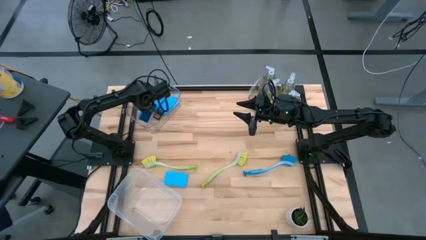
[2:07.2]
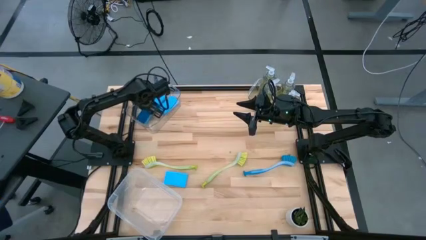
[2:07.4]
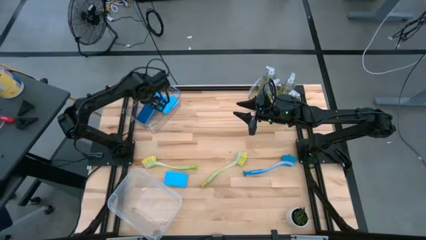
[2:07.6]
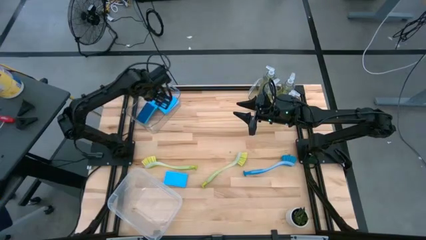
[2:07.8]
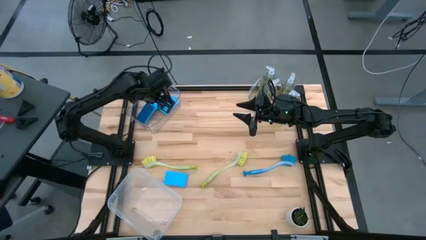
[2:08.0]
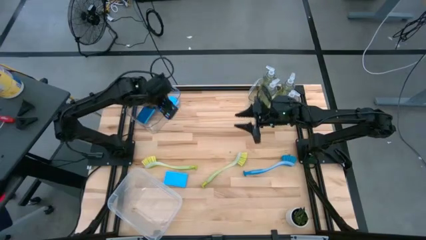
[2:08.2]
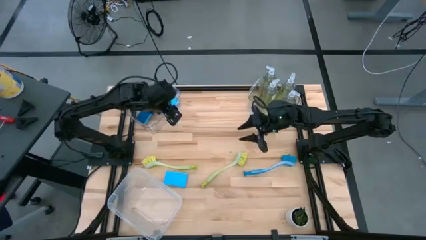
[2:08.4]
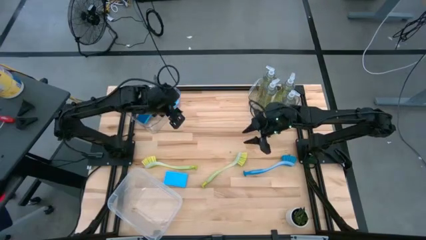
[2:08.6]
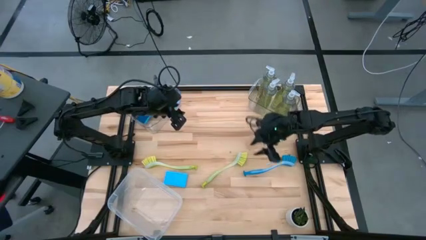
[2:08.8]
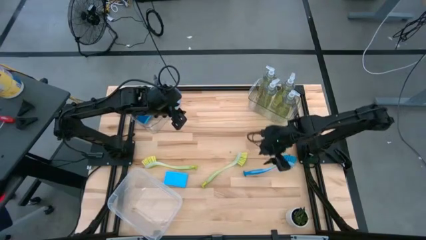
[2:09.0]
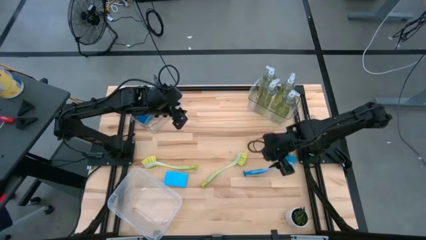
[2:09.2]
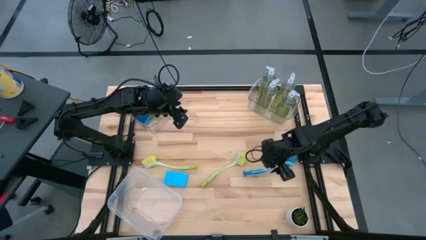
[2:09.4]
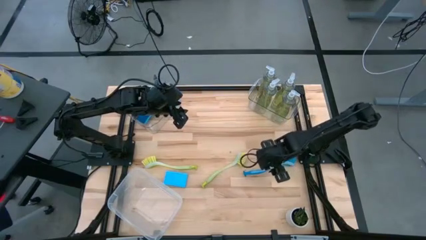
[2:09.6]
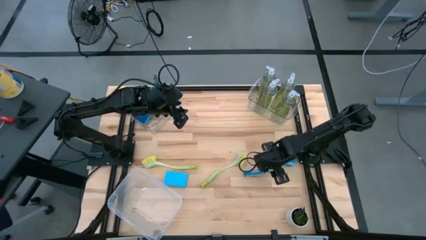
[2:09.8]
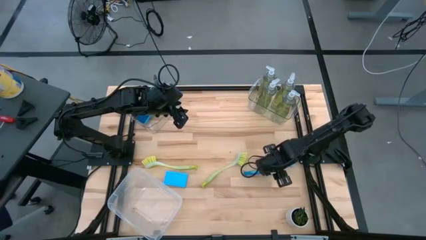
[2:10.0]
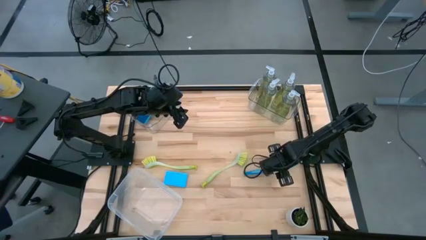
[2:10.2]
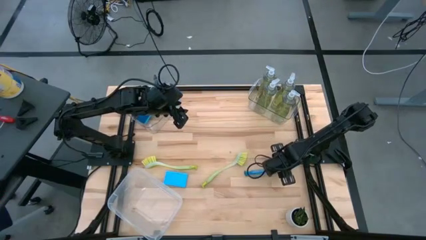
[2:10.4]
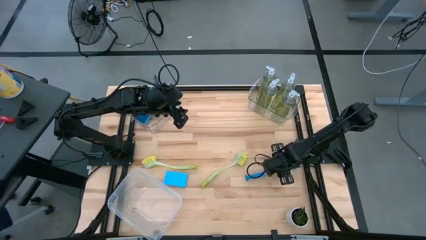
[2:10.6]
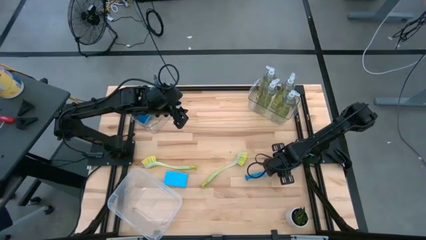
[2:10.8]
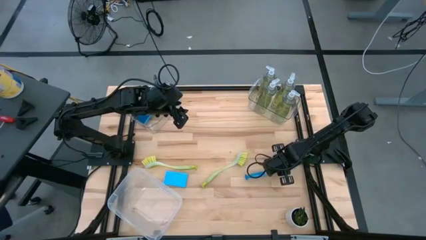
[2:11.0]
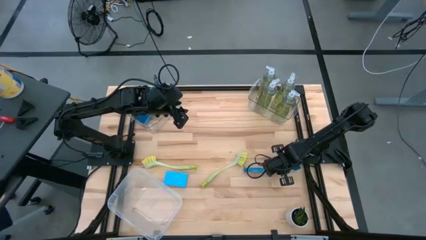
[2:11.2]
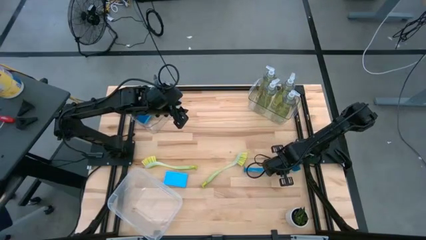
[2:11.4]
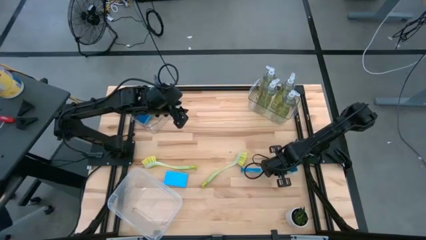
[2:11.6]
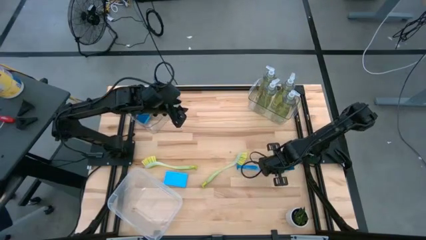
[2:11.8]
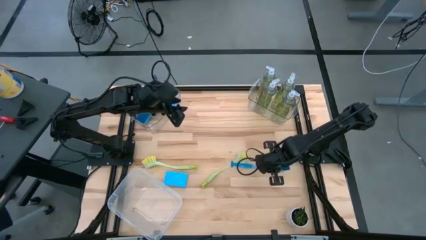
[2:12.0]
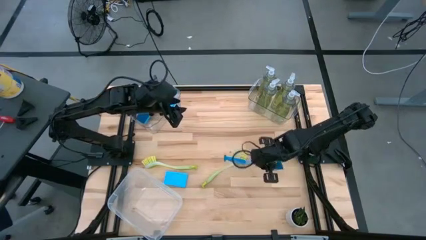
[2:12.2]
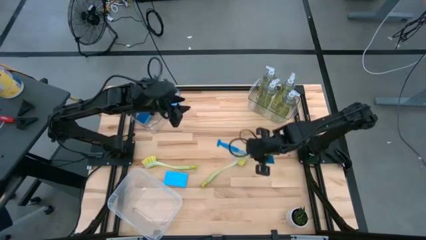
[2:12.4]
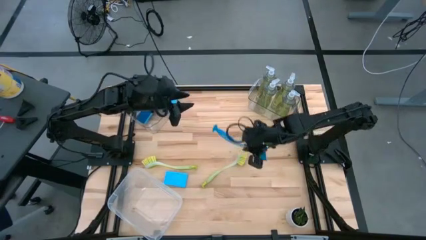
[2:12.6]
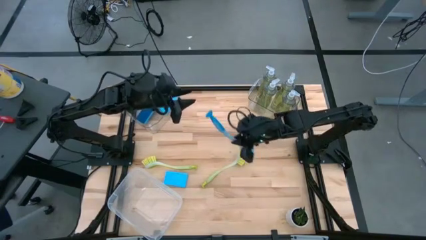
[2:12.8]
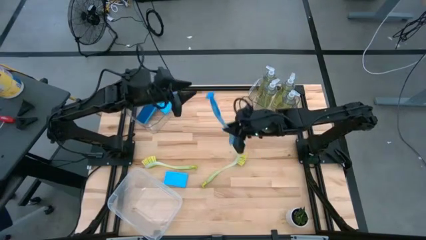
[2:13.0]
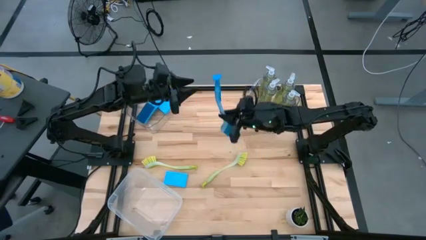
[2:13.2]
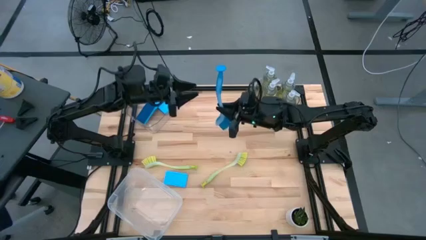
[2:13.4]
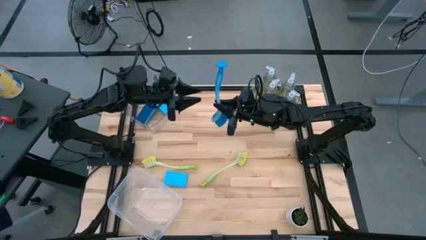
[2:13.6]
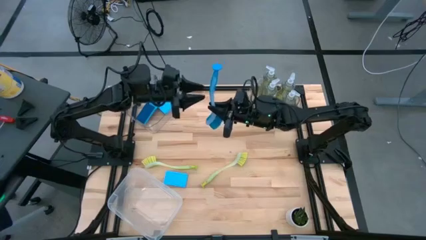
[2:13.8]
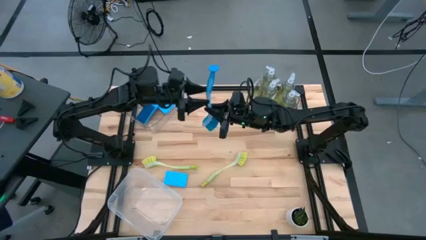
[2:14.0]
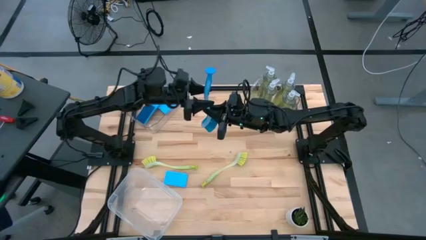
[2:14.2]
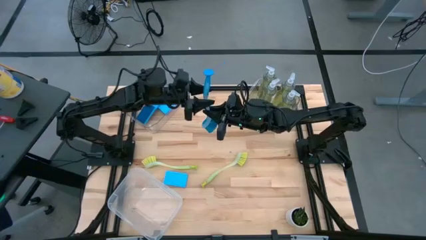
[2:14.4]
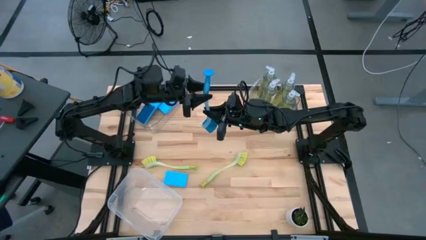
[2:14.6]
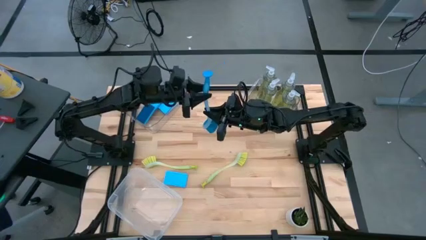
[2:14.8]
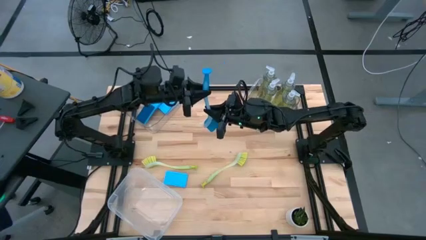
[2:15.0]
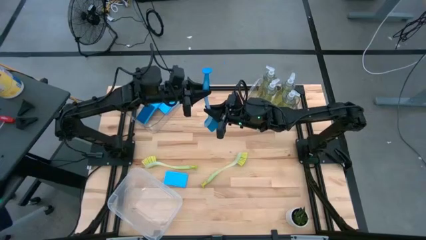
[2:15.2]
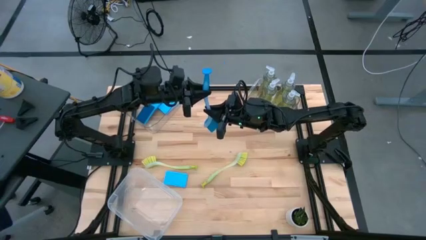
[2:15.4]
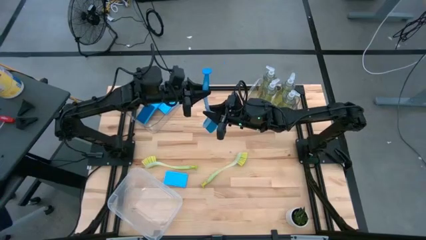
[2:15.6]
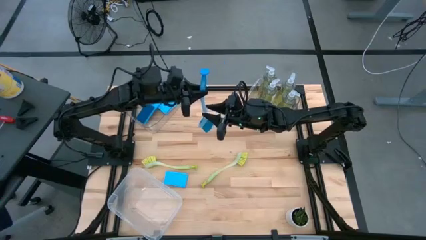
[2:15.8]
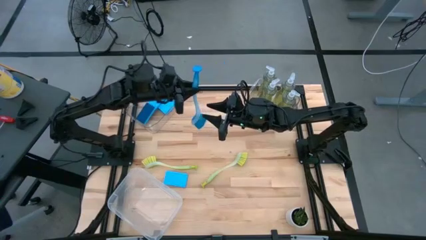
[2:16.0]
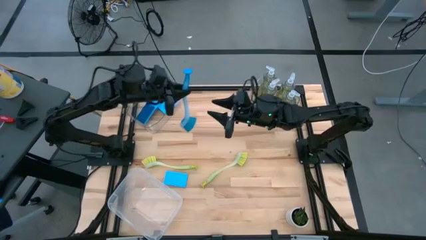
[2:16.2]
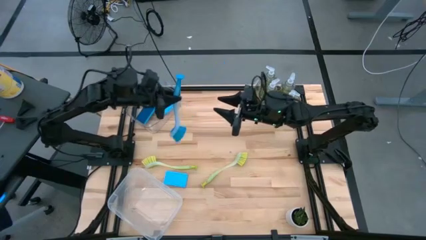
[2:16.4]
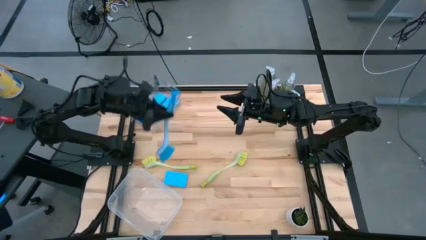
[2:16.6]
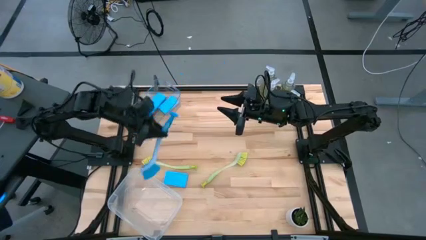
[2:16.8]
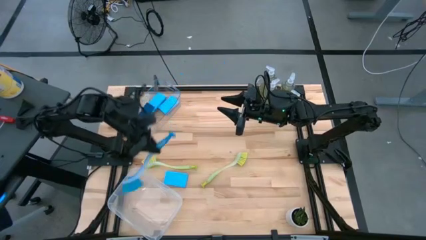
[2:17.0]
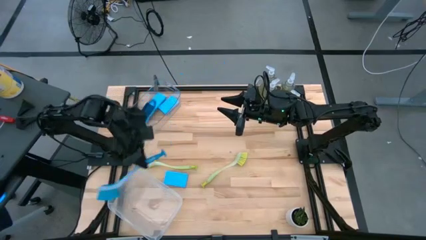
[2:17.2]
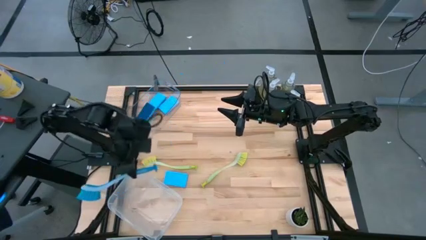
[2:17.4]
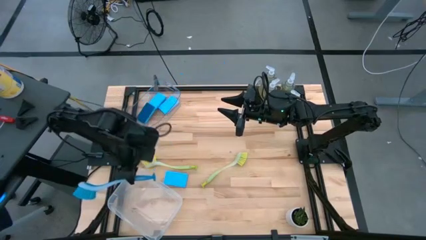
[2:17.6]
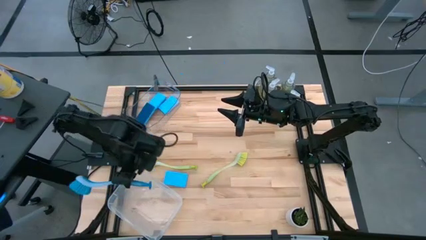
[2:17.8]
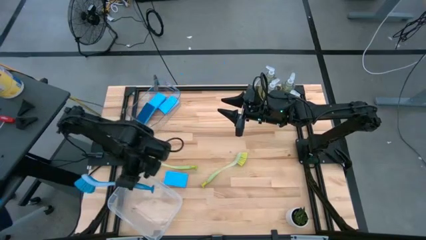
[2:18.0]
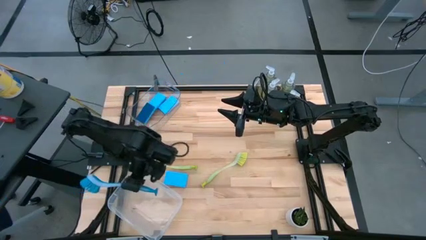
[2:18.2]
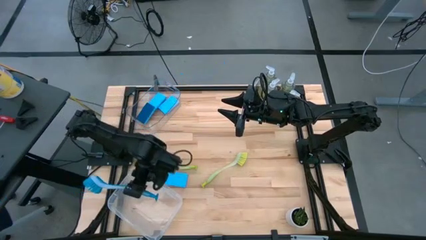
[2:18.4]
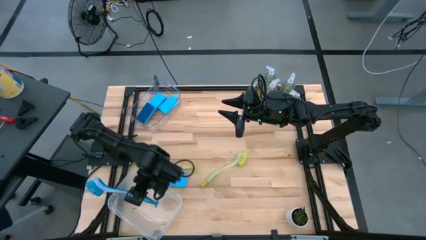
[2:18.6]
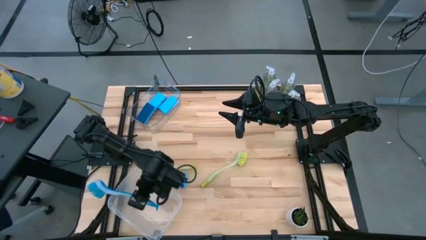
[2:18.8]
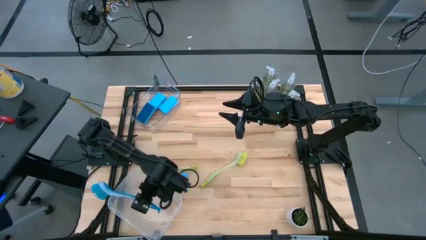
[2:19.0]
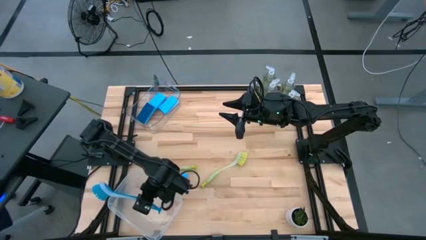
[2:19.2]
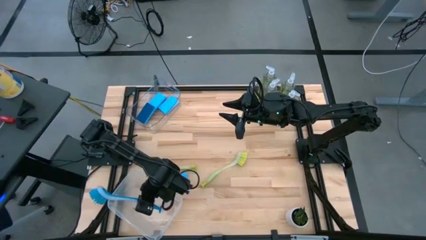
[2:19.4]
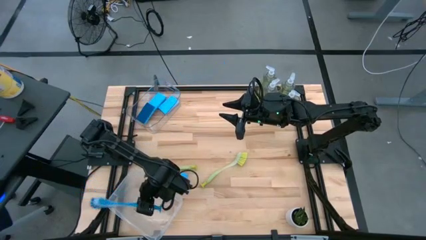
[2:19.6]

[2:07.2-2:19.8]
Task: Pick & Place Kitchen Sink Supplies
Put the blue dish brush into the white bin

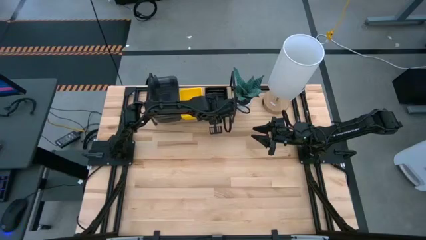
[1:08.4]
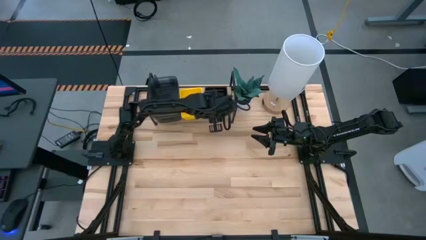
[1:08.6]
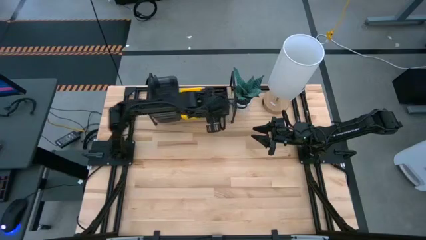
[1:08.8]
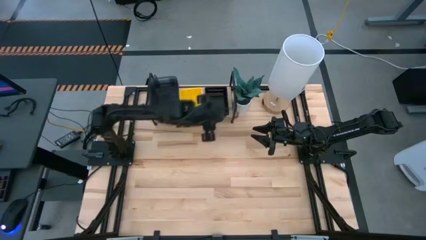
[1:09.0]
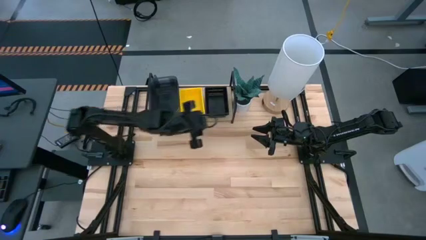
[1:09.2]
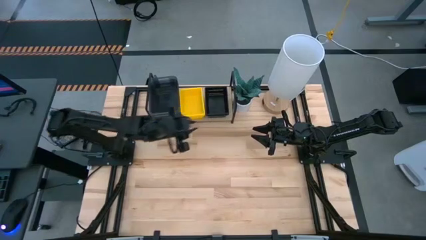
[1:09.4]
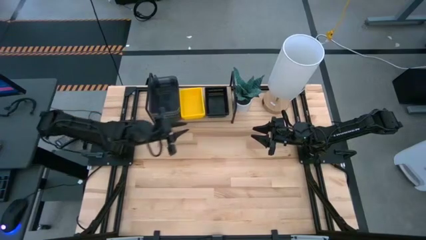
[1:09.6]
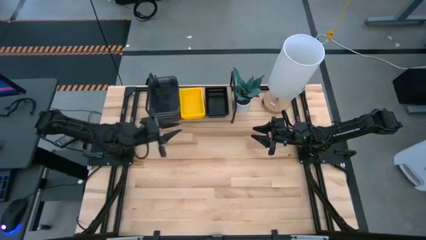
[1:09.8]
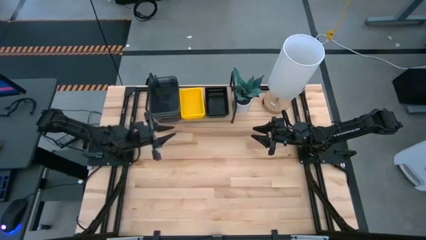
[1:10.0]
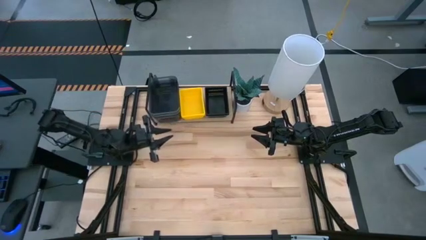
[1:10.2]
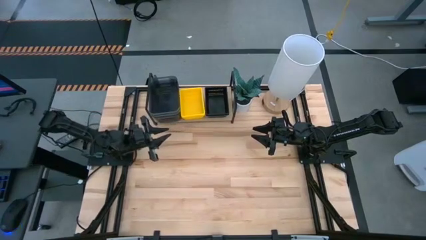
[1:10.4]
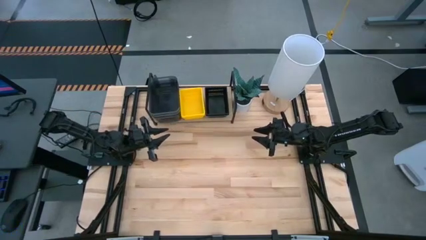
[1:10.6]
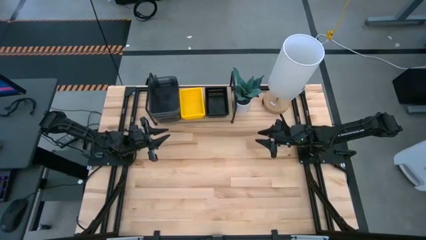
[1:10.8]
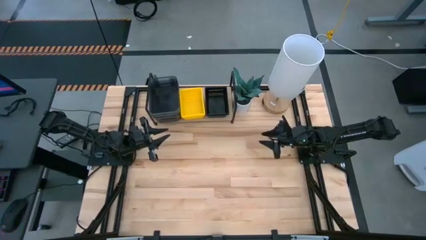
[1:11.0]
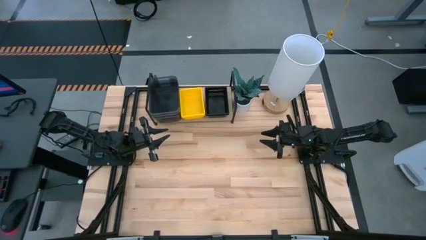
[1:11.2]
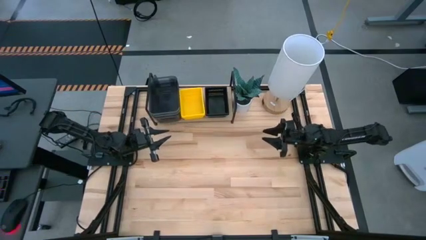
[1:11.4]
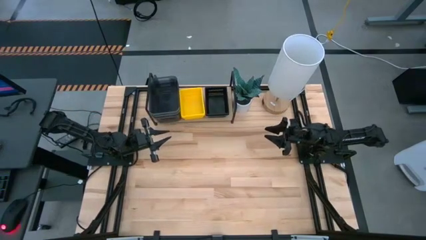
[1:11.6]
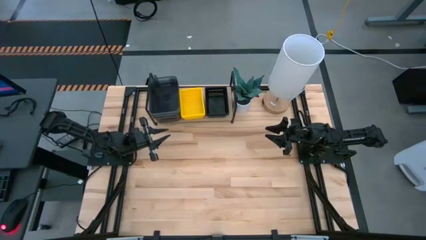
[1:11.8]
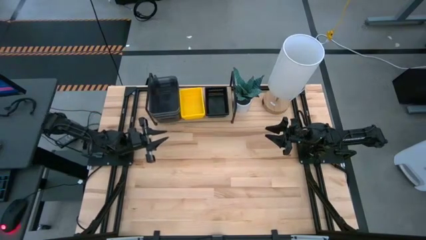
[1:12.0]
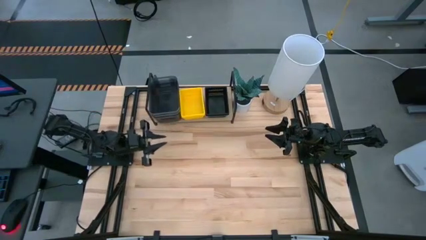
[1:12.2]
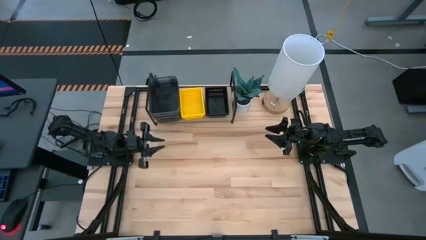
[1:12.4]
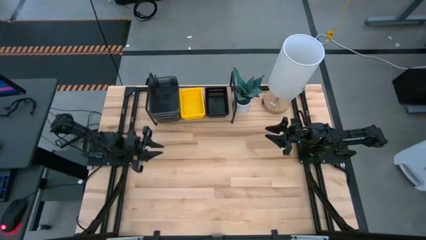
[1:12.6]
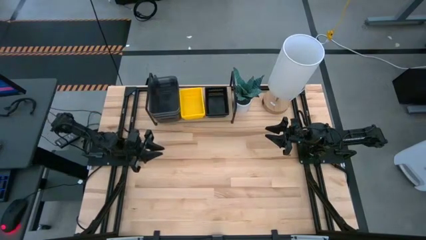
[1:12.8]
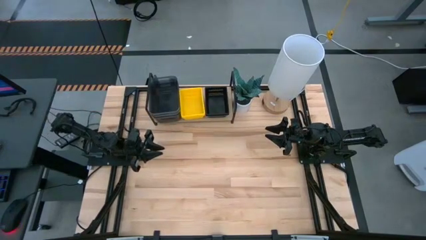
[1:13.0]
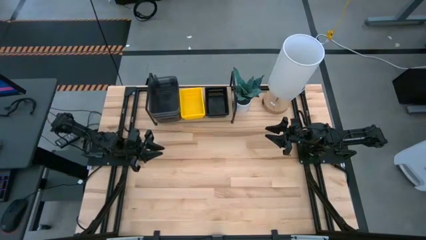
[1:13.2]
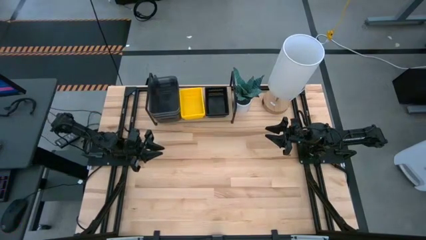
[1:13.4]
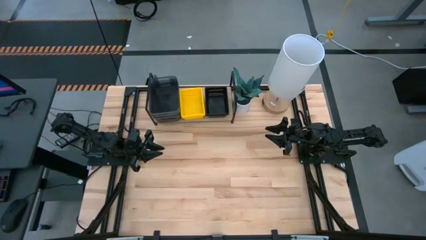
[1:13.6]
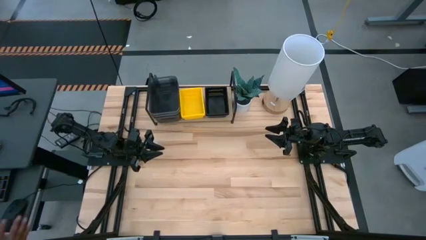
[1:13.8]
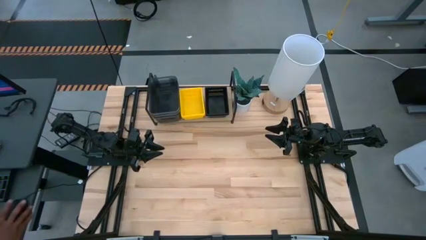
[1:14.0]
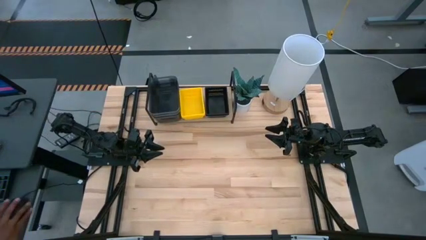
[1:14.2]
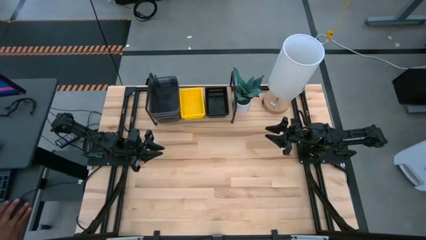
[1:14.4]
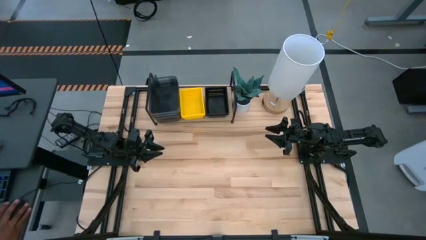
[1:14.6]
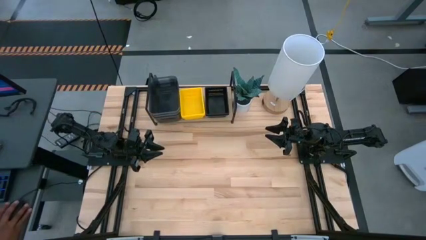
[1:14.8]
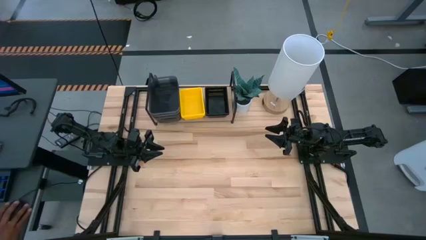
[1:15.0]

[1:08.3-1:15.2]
Task: Stack baskets on shelf by color
Return to Home Position
